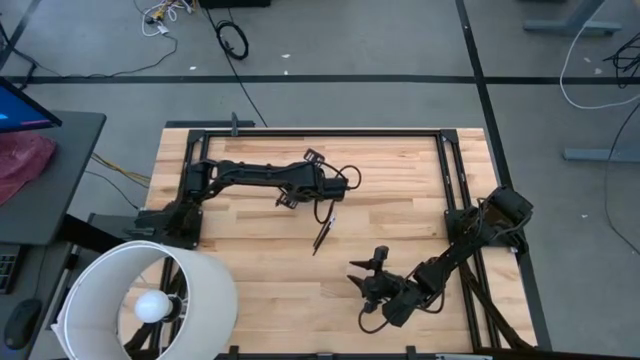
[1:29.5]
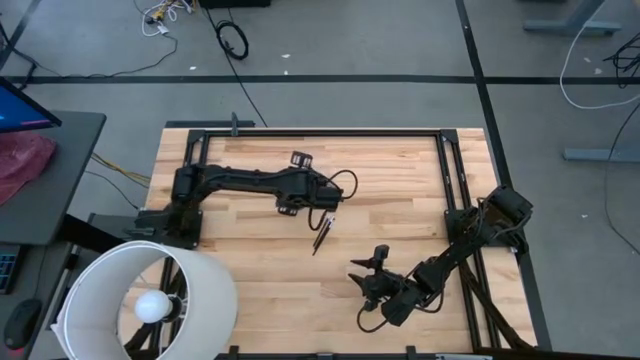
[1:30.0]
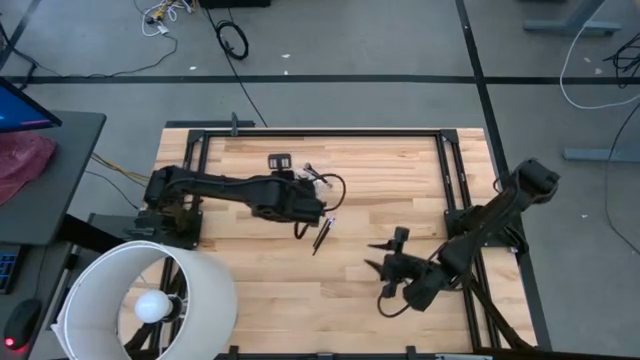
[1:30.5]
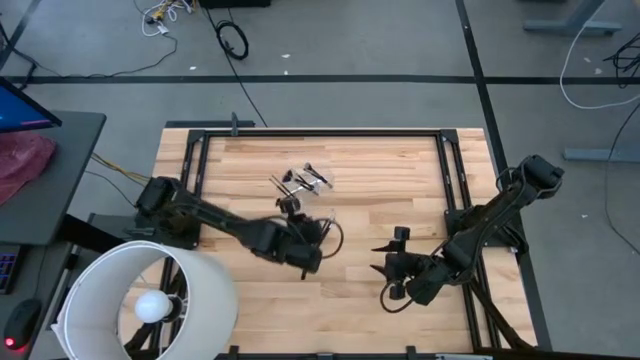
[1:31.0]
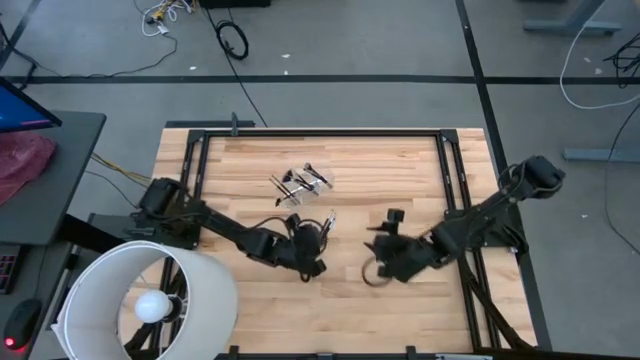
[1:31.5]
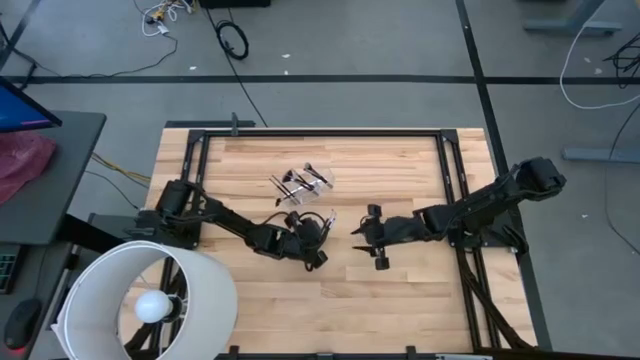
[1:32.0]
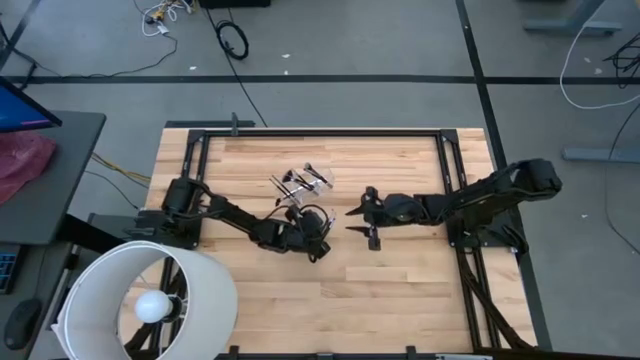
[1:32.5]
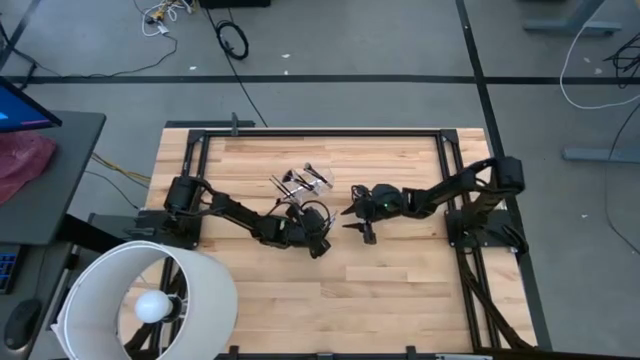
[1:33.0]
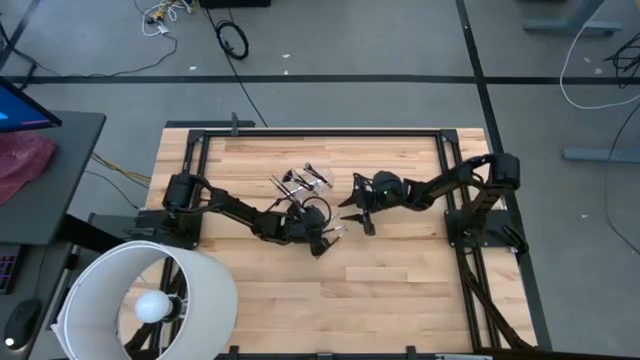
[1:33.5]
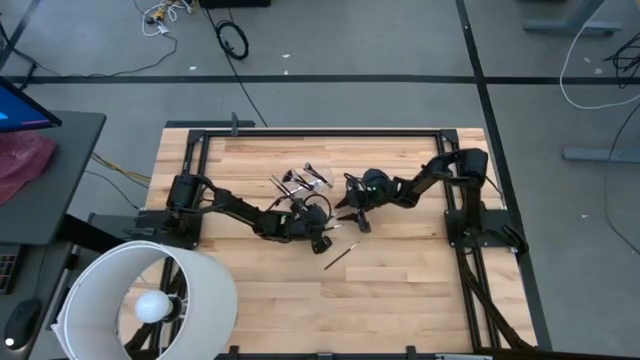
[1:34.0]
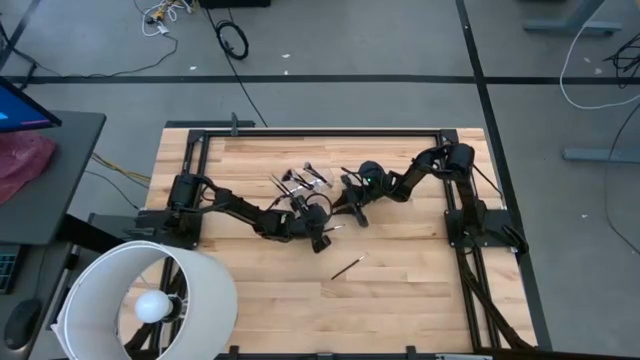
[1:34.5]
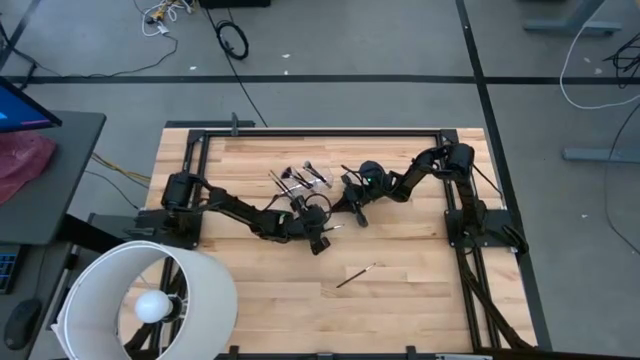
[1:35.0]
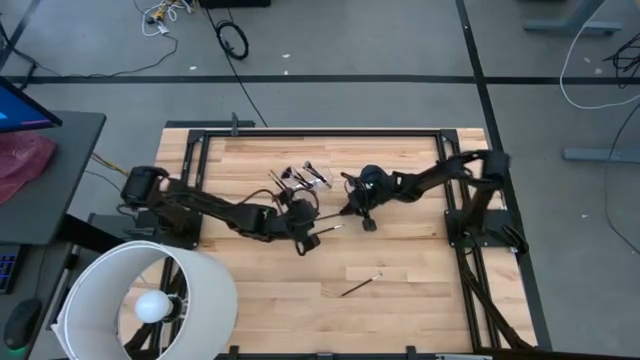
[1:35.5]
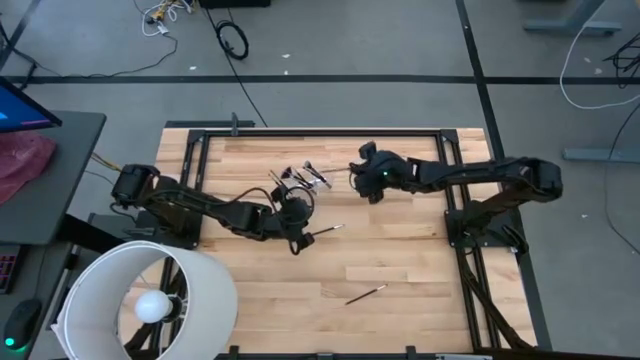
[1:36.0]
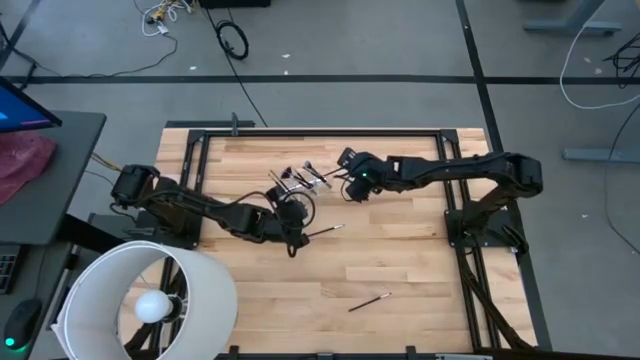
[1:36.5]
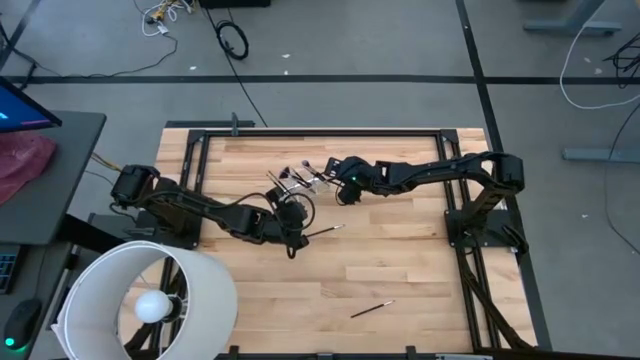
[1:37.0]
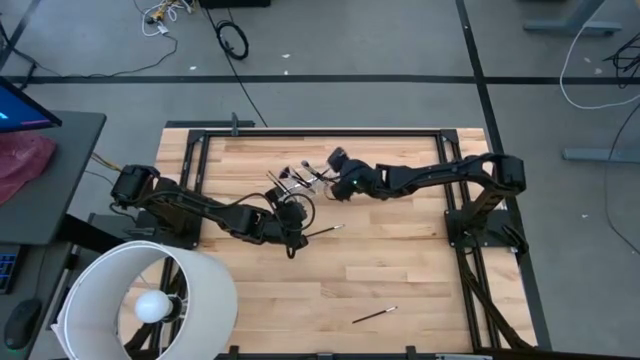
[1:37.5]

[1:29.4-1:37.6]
Task: Put items in baskets/containers
Put the black eyeshadow brush into the transparent organizer

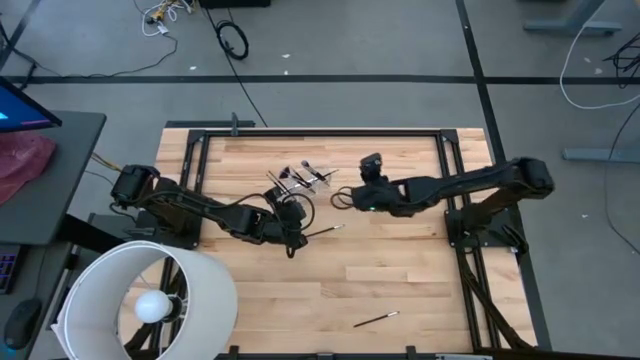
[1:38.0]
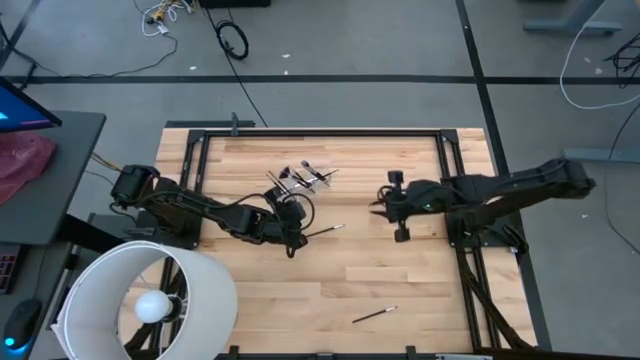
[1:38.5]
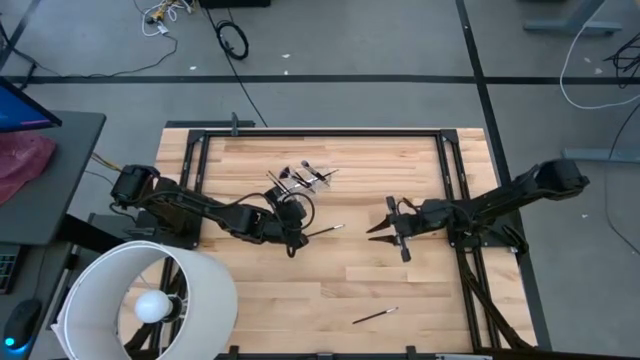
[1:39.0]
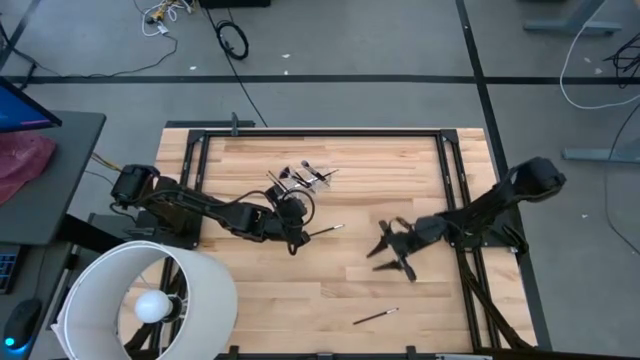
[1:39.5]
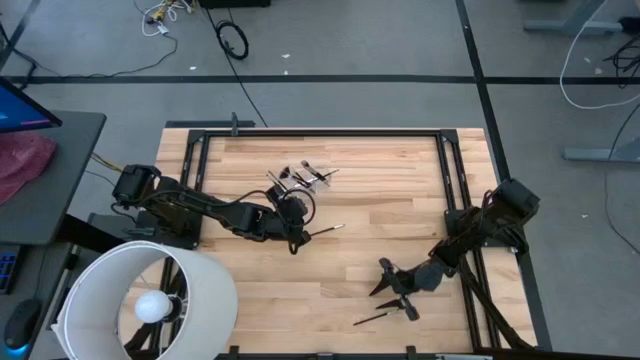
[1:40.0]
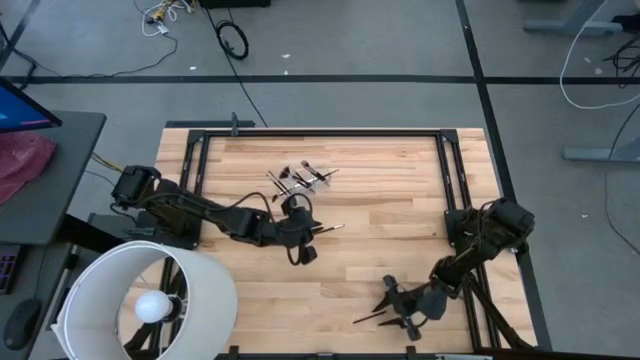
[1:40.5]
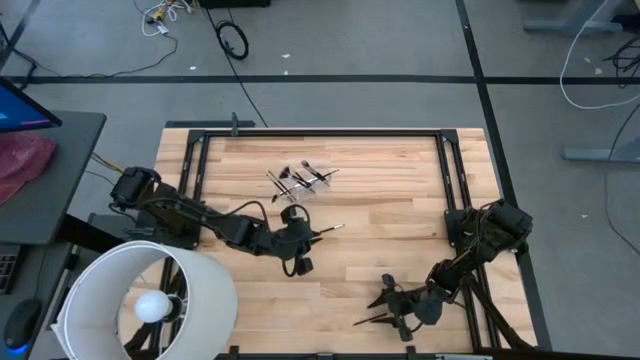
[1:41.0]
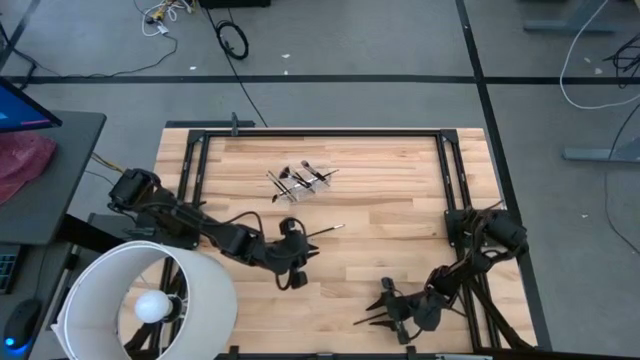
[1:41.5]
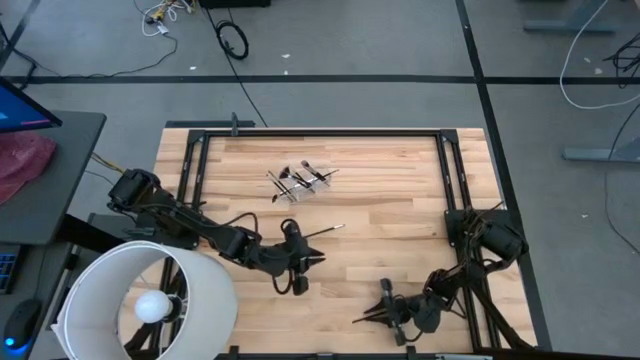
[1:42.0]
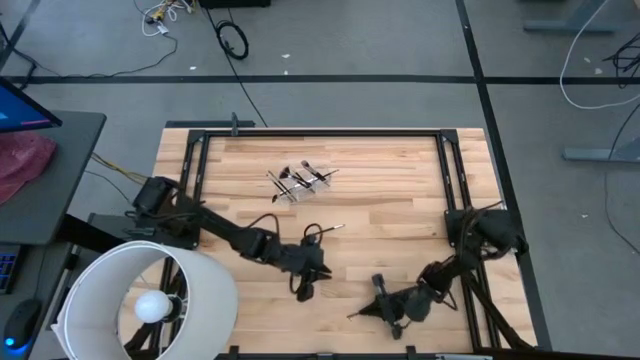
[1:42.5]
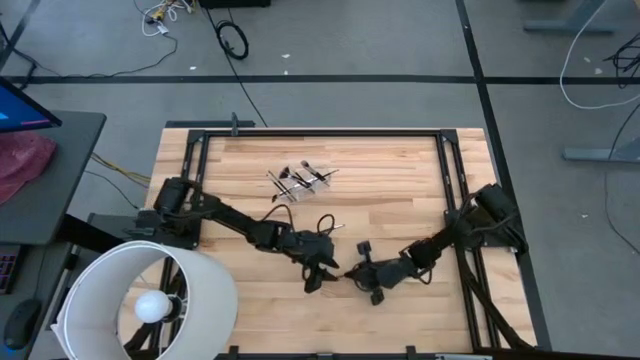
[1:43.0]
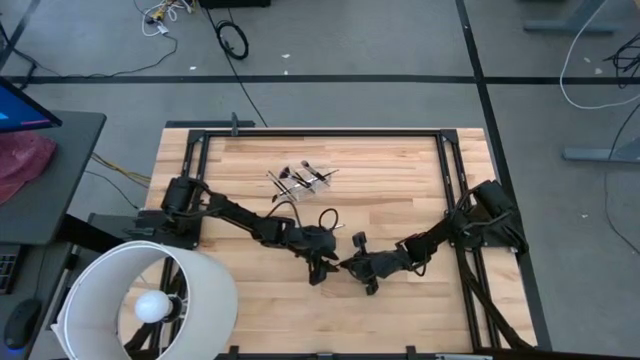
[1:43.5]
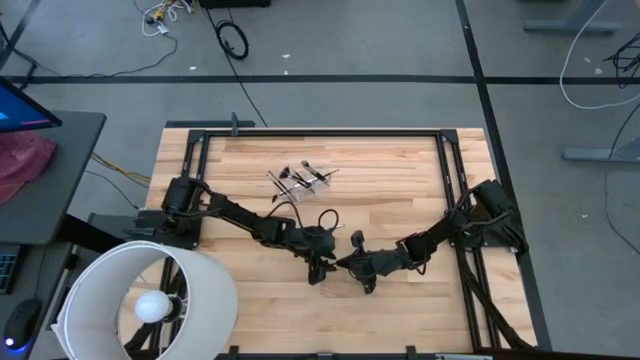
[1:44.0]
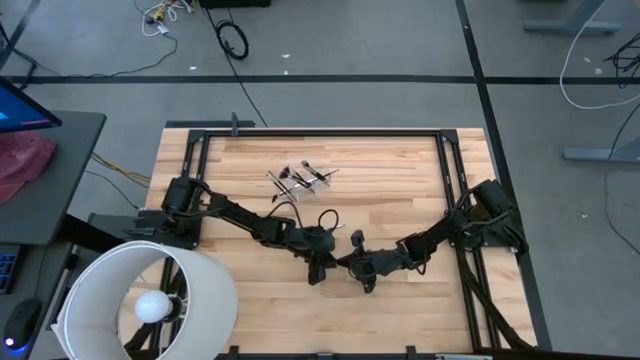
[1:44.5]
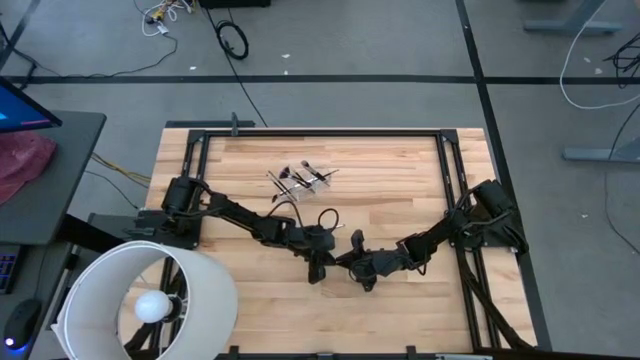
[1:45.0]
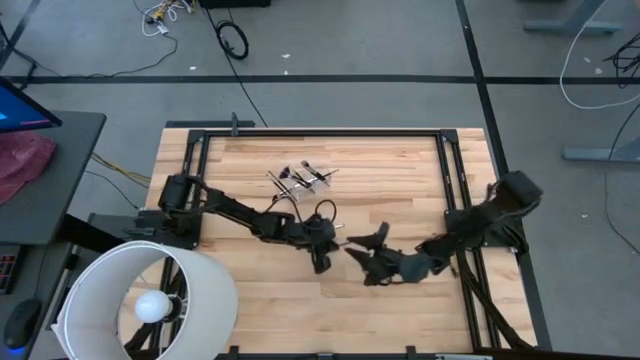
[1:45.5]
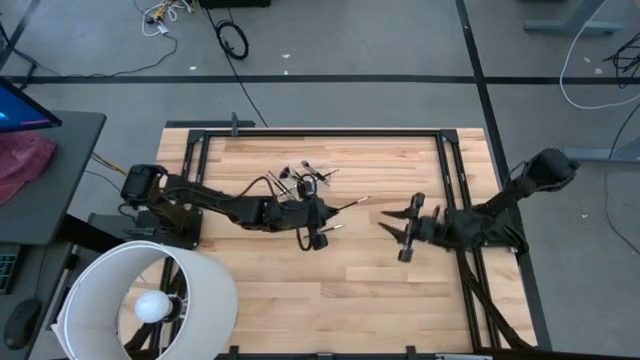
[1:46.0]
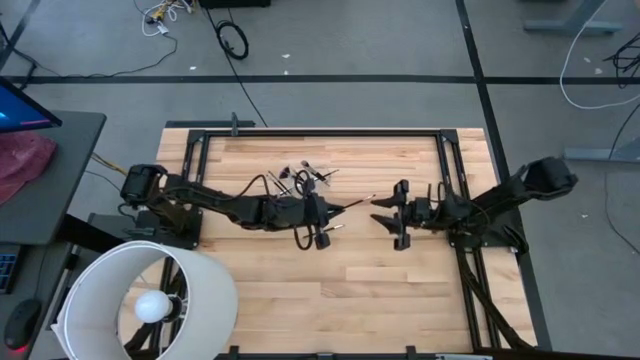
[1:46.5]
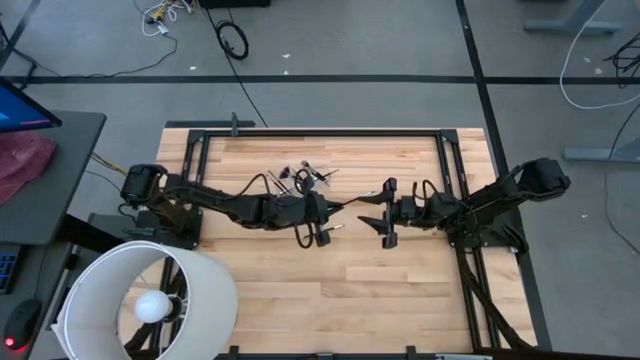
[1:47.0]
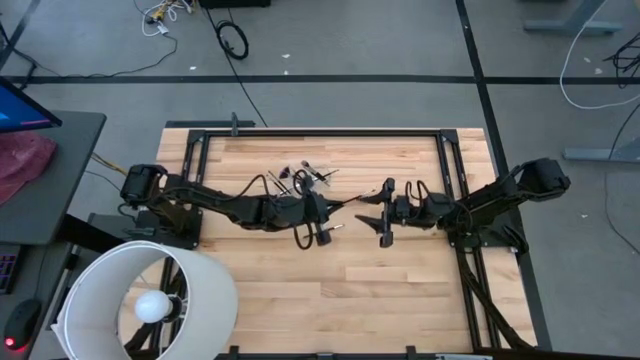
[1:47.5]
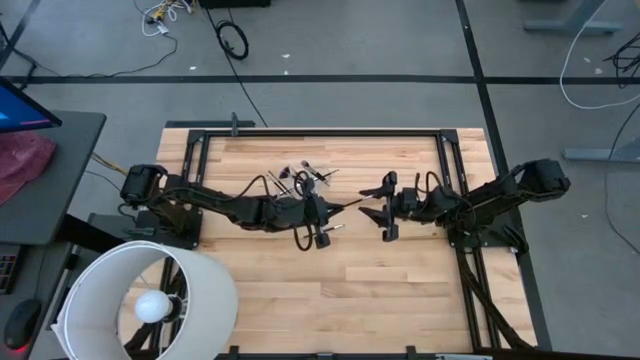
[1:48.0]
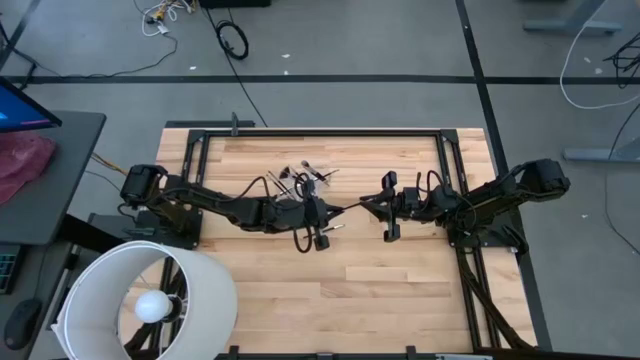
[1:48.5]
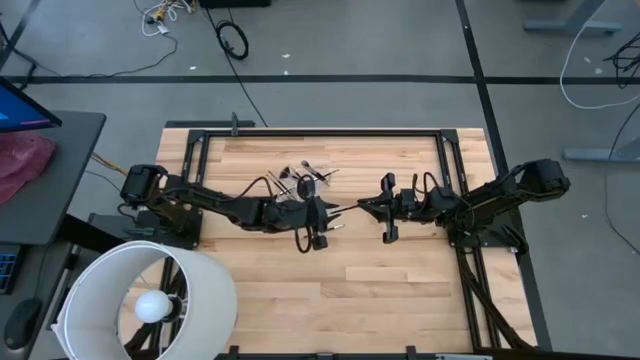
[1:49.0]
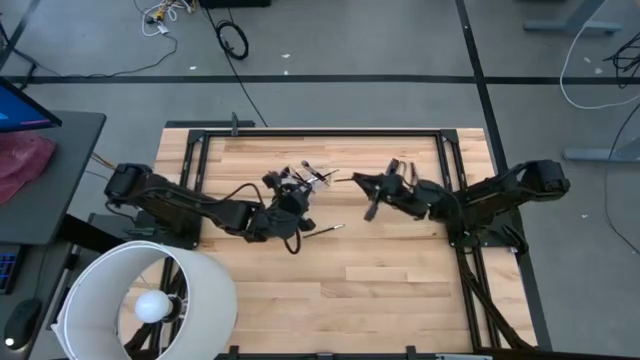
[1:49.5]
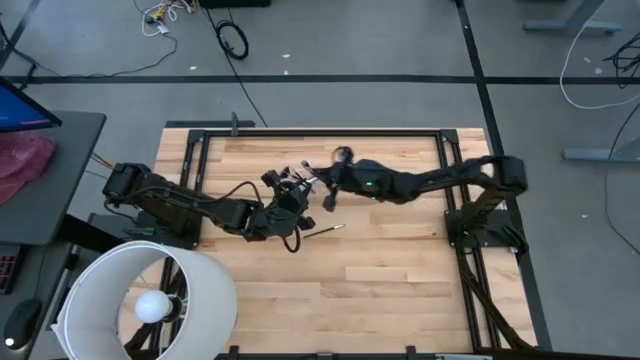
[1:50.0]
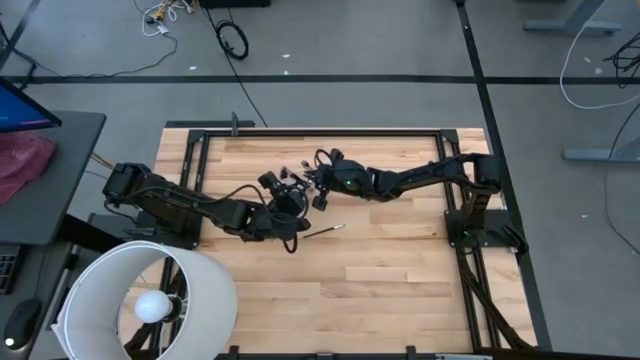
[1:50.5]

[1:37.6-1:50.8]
Put the black eyeshadow brush into the transparent organizer
